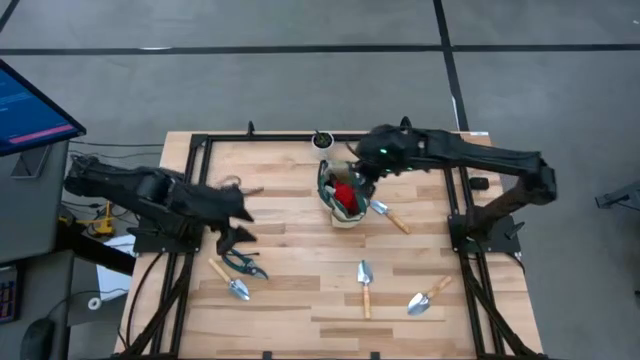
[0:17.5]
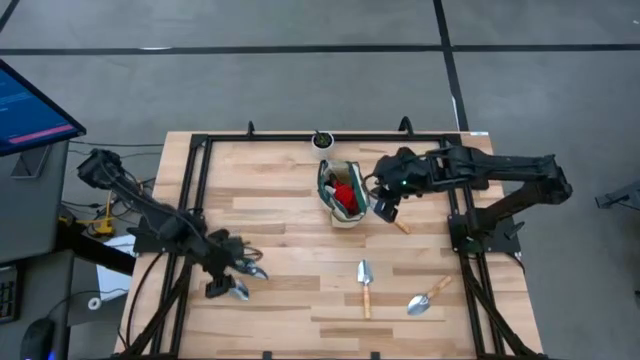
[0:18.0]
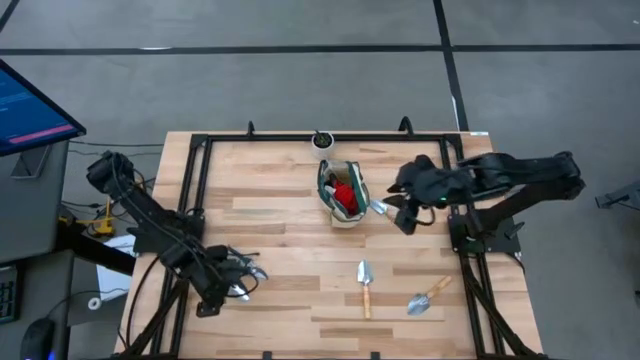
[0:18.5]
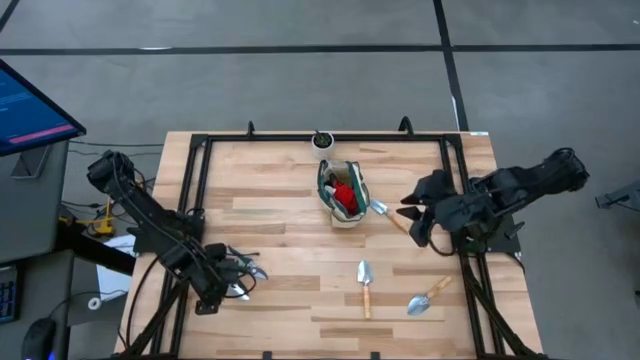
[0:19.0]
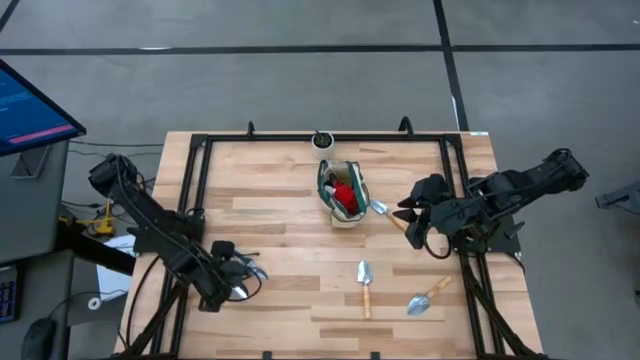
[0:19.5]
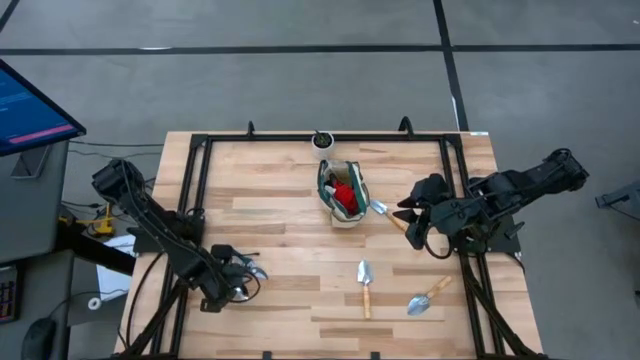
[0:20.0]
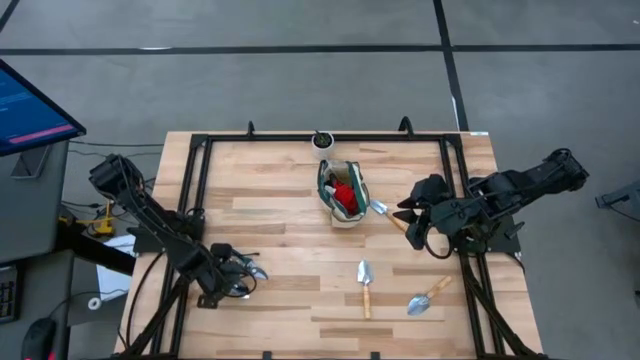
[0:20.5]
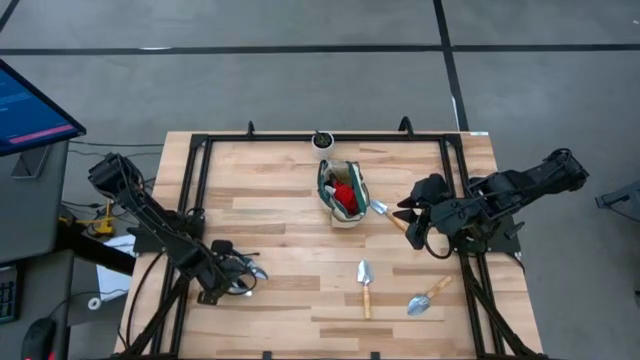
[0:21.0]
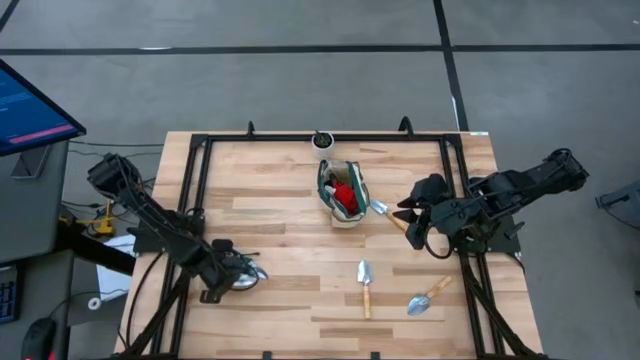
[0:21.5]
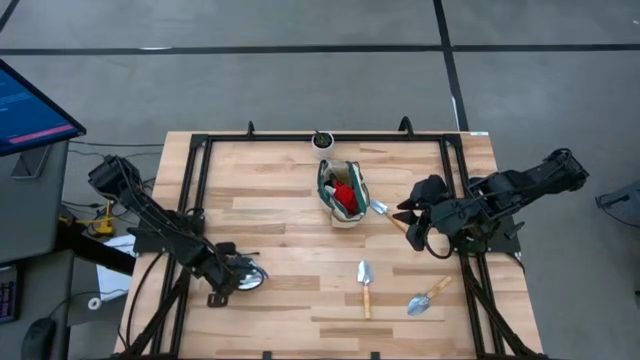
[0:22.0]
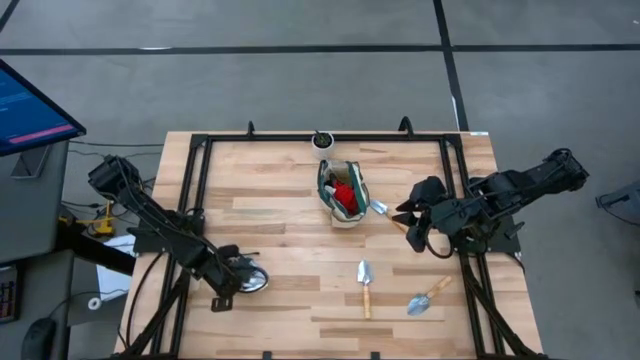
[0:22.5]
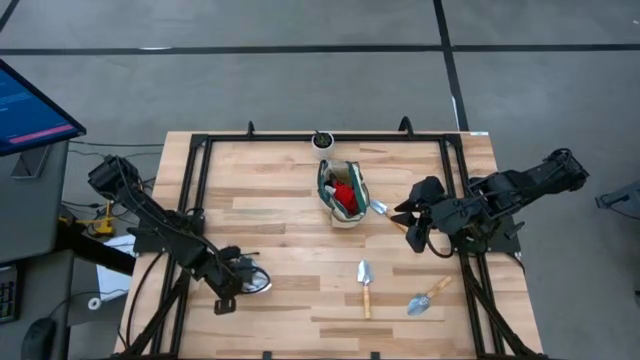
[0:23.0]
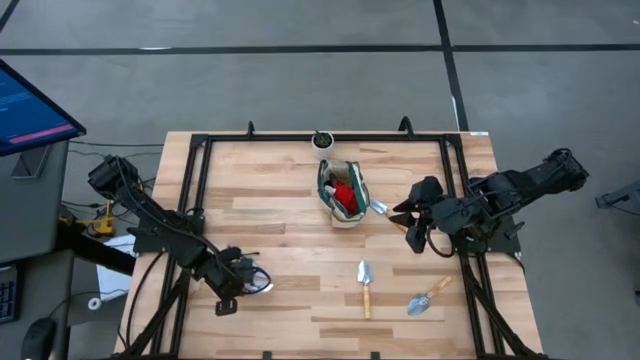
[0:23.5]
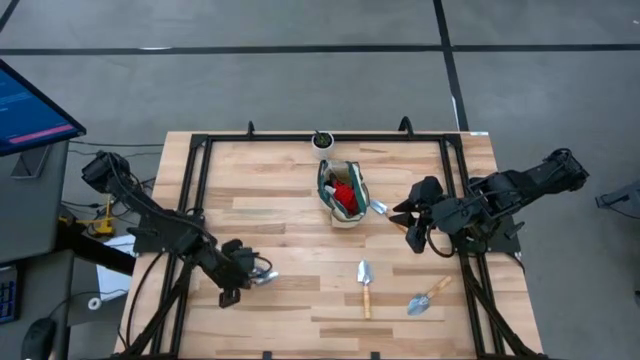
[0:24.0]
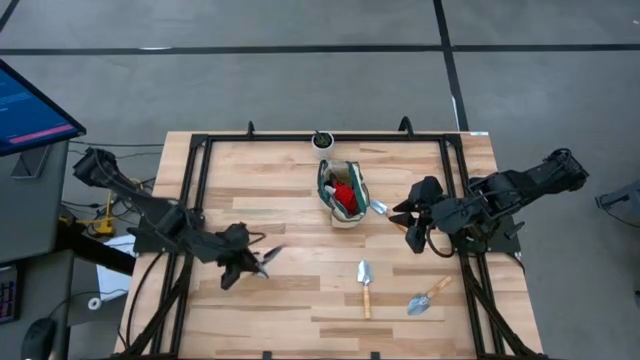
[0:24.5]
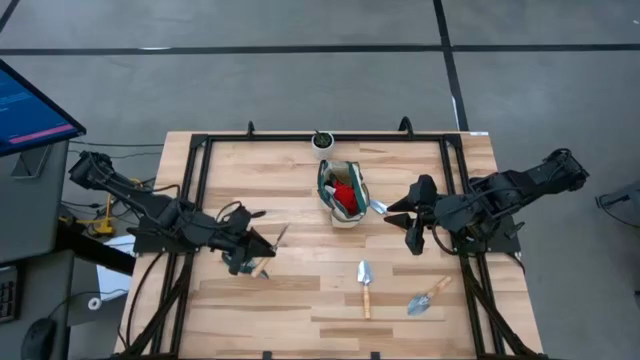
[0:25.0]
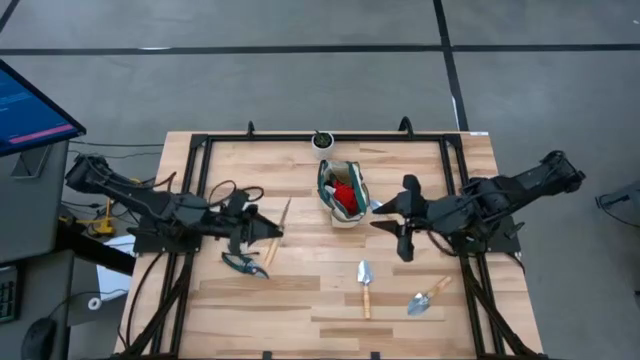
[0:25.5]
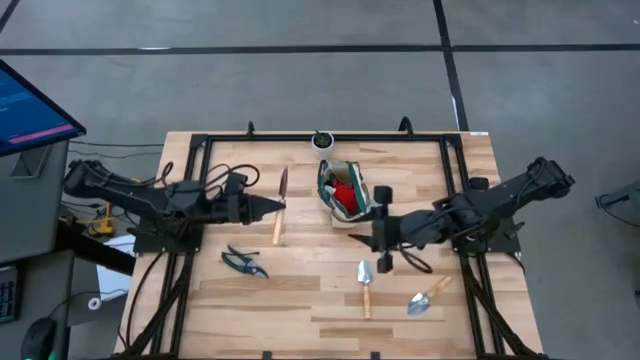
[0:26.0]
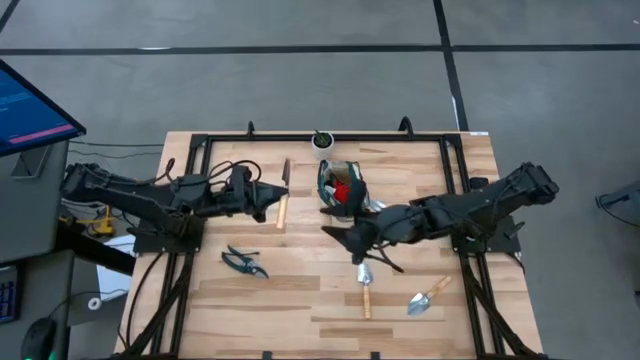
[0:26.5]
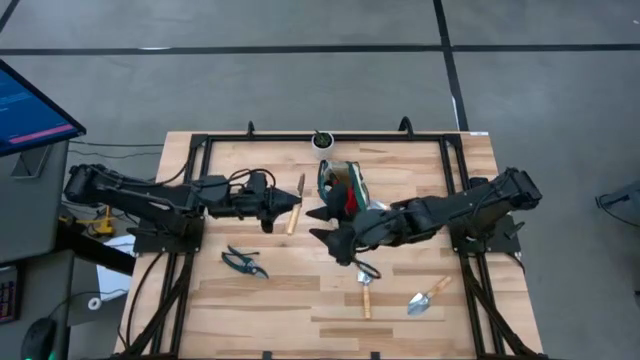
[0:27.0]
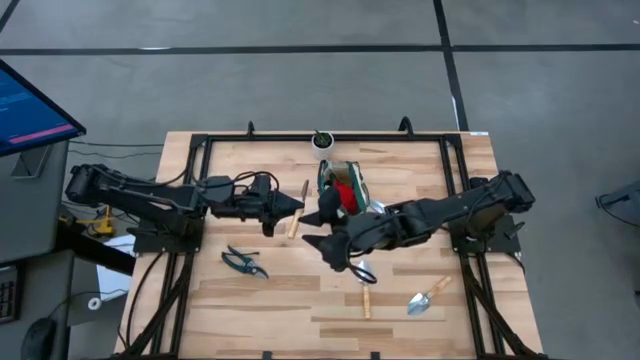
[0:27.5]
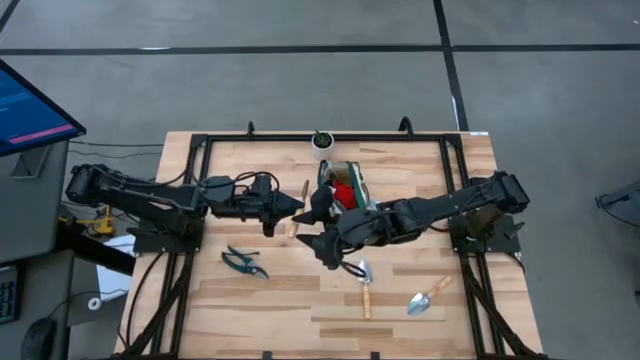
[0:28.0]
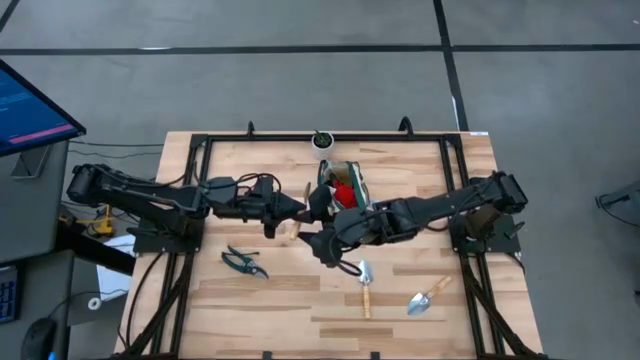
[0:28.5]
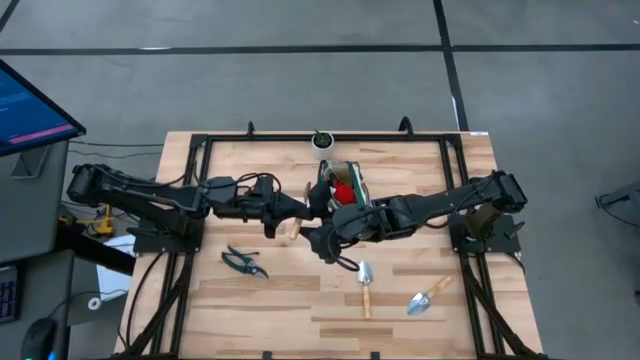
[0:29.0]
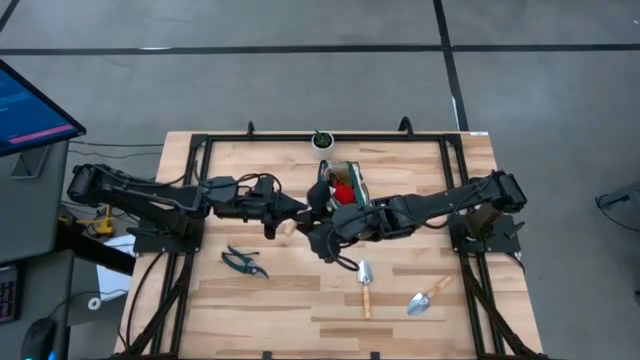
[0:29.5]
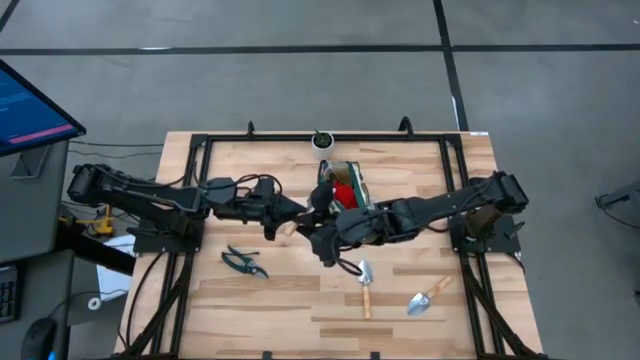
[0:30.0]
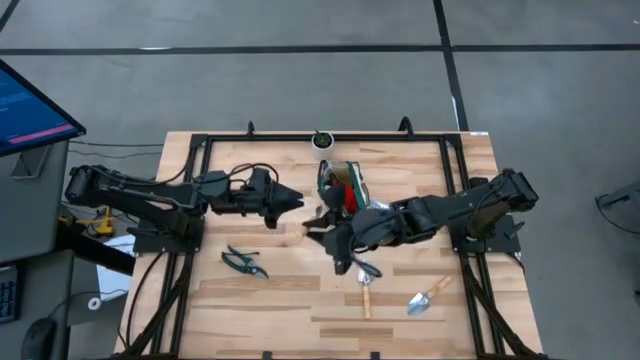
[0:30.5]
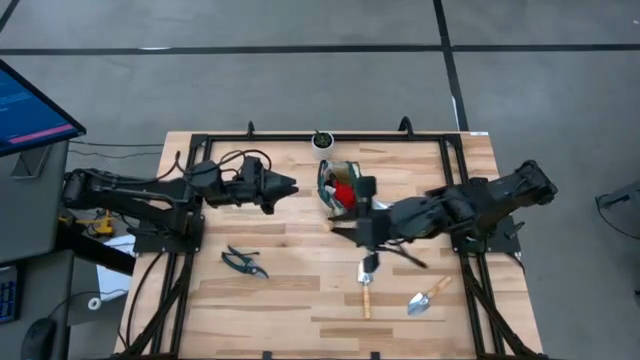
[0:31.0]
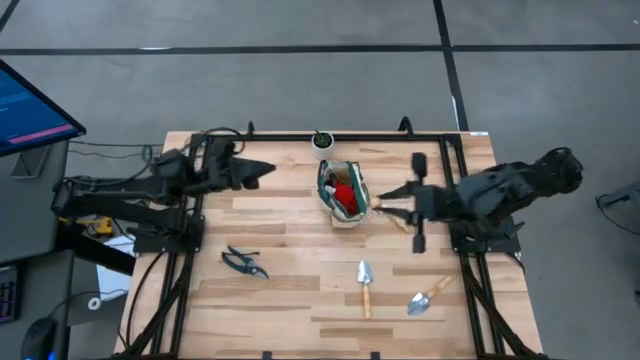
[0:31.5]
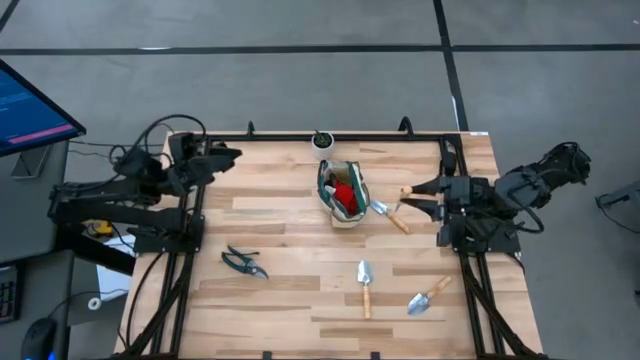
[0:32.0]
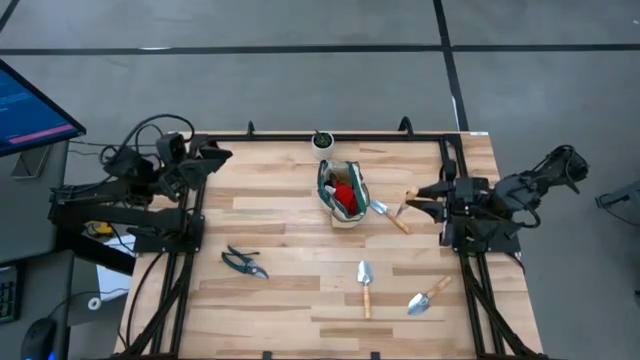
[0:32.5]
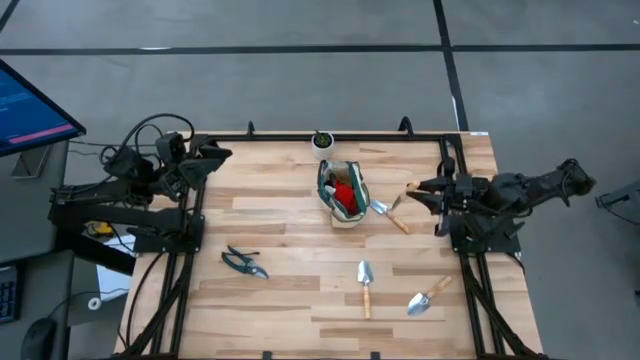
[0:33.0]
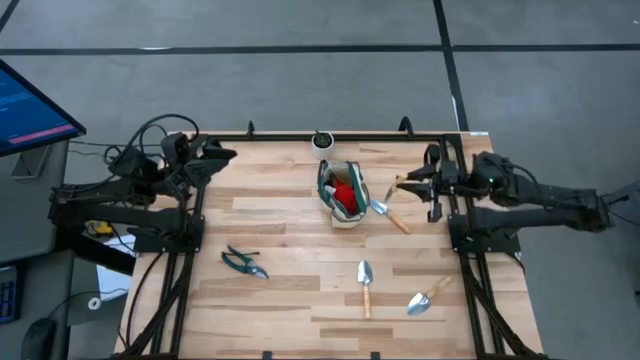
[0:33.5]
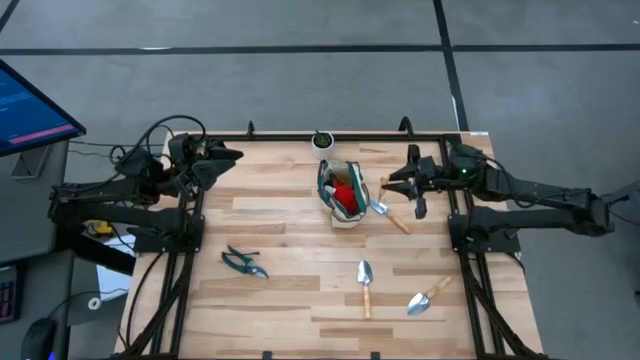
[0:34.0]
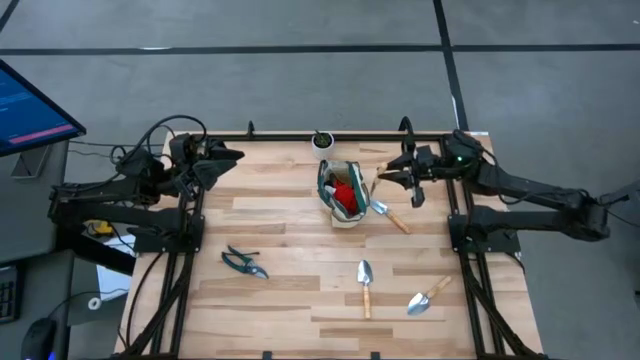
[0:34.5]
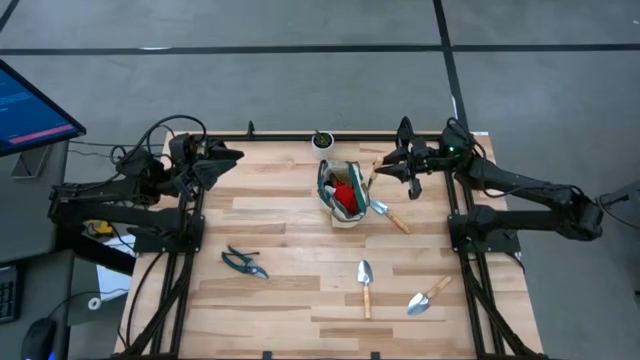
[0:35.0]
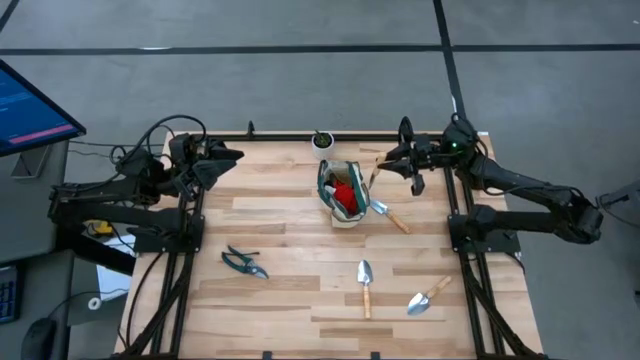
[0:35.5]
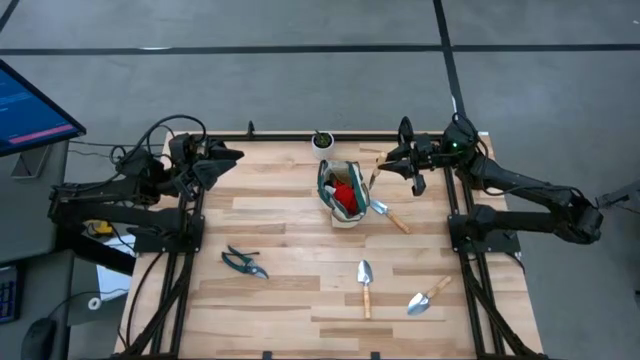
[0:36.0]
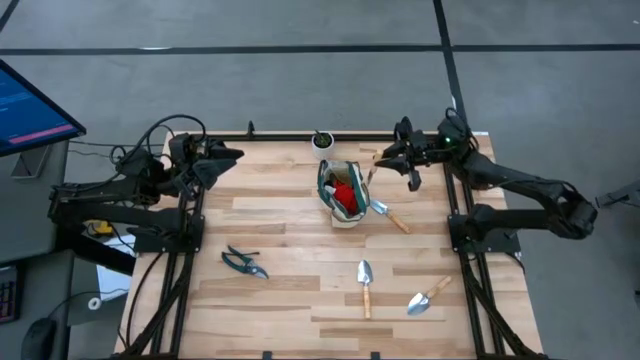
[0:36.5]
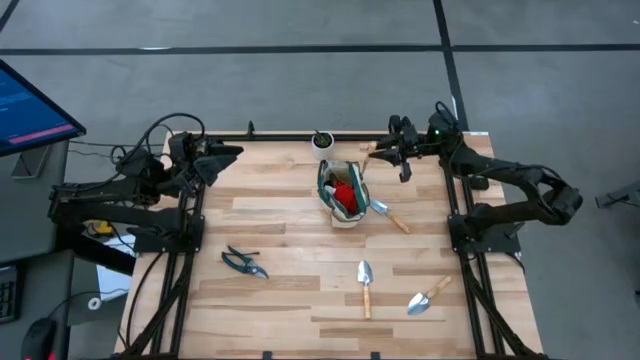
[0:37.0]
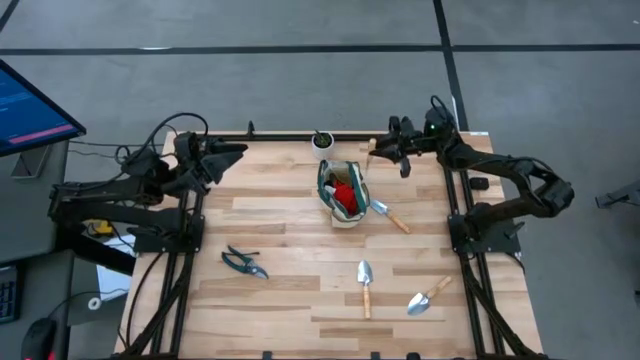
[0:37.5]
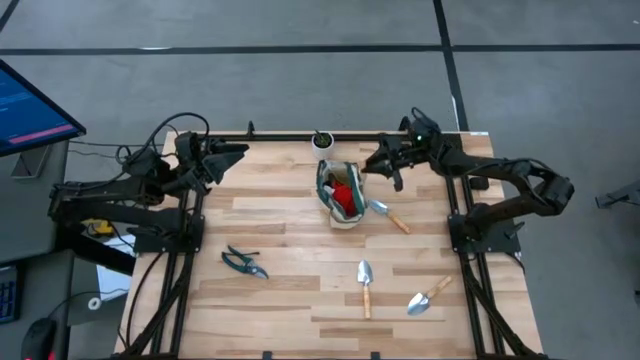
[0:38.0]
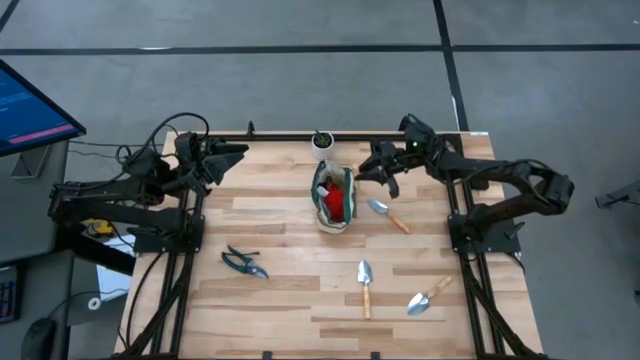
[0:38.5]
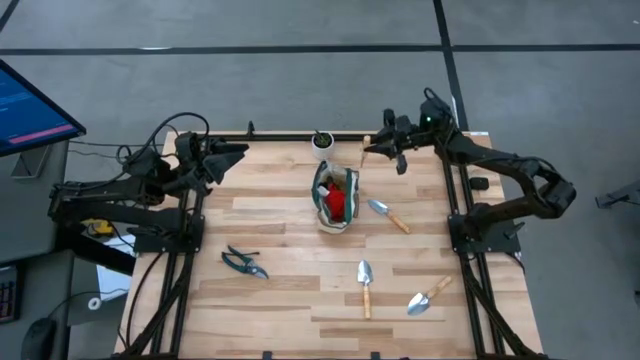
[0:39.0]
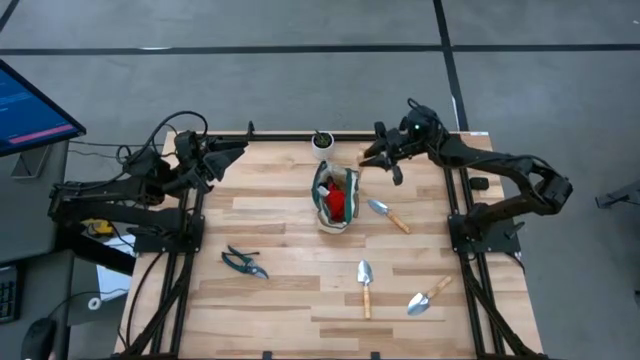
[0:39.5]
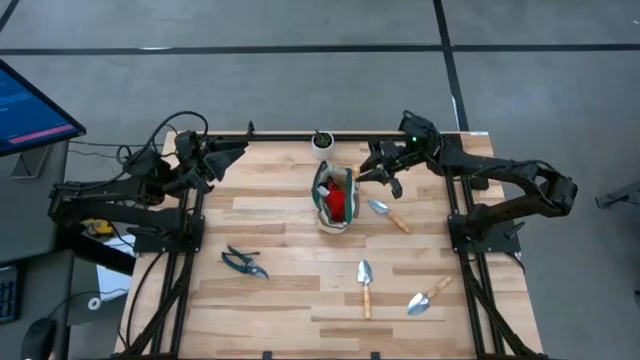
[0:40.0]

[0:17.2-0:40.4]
Task: Pick & Place Garden tools in Gardening bag
Put the brown trowel into the green gardening bag
